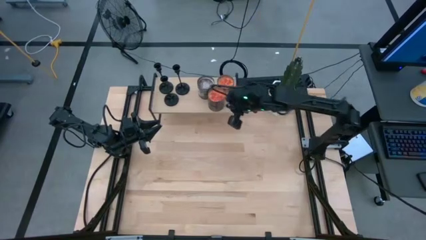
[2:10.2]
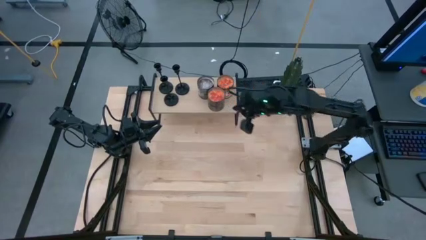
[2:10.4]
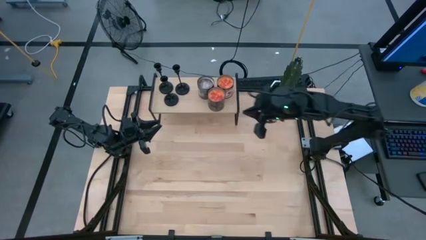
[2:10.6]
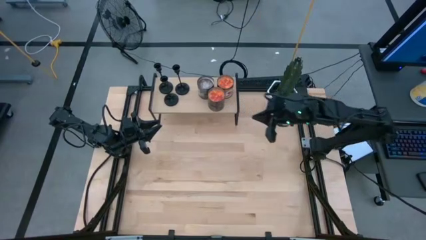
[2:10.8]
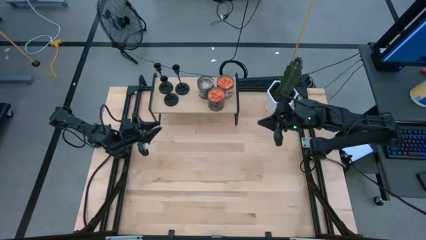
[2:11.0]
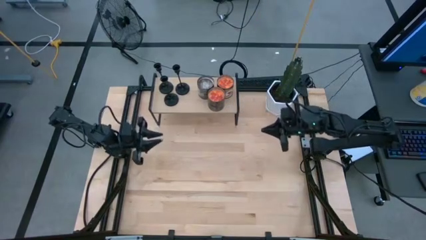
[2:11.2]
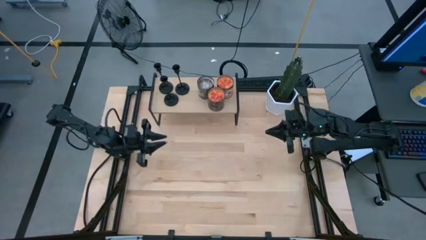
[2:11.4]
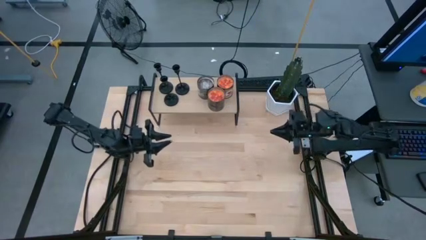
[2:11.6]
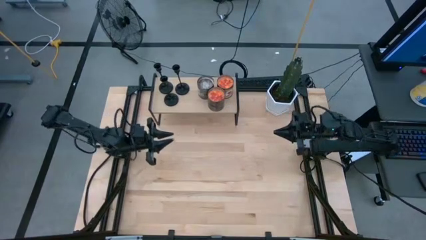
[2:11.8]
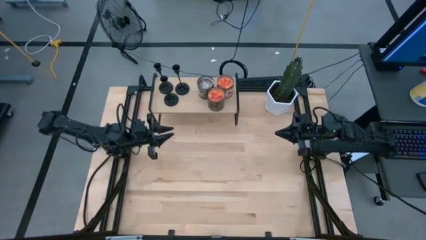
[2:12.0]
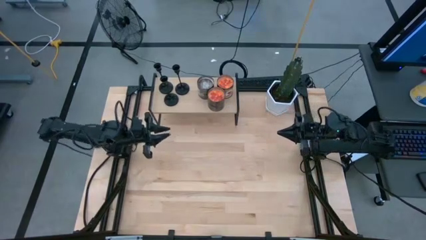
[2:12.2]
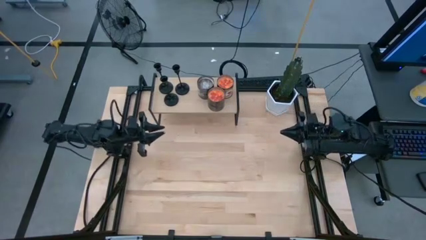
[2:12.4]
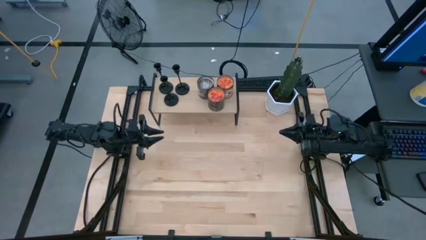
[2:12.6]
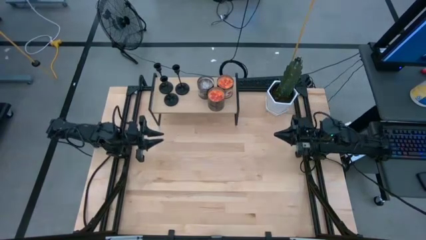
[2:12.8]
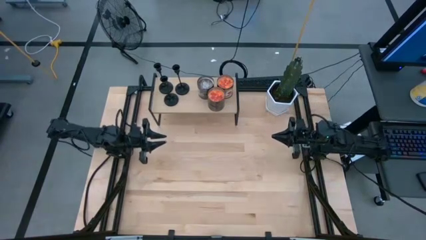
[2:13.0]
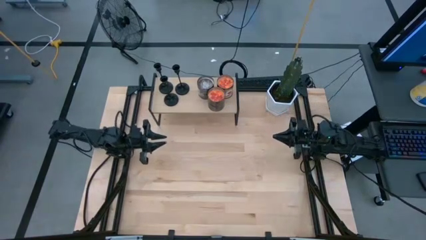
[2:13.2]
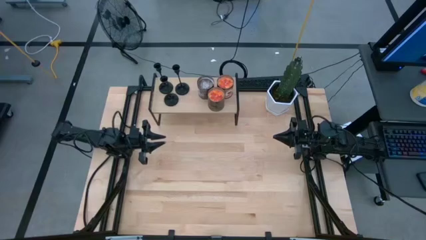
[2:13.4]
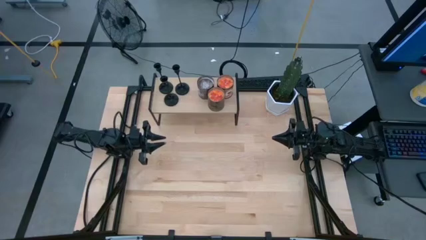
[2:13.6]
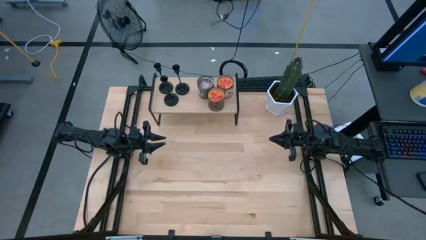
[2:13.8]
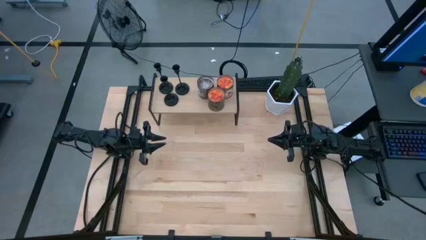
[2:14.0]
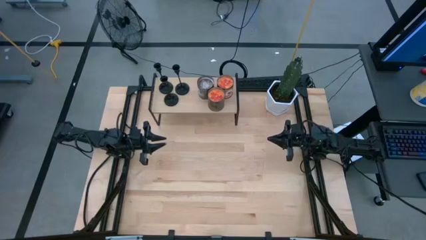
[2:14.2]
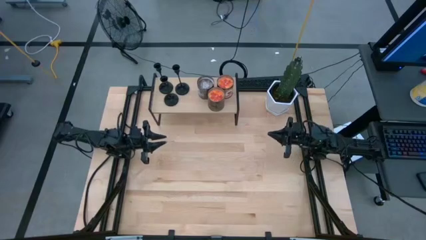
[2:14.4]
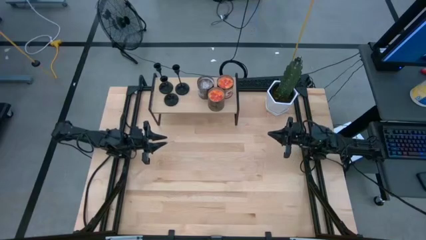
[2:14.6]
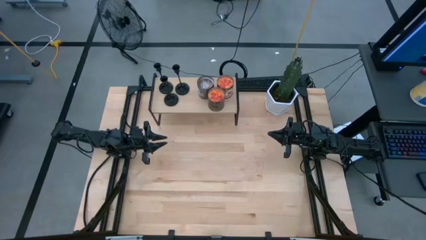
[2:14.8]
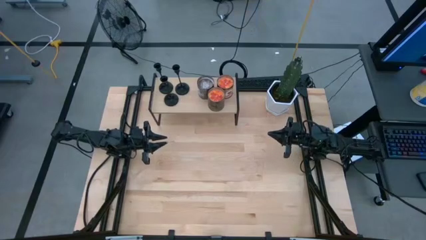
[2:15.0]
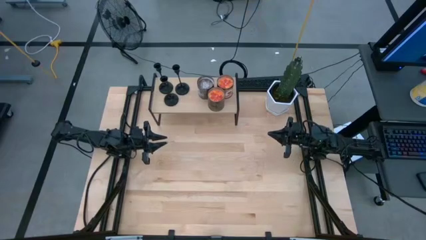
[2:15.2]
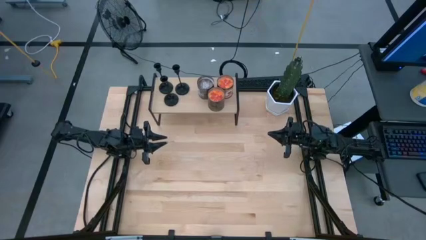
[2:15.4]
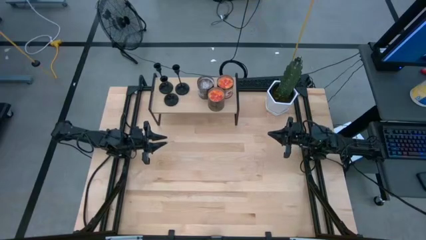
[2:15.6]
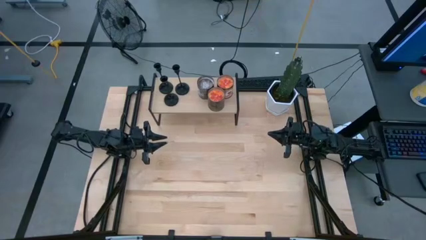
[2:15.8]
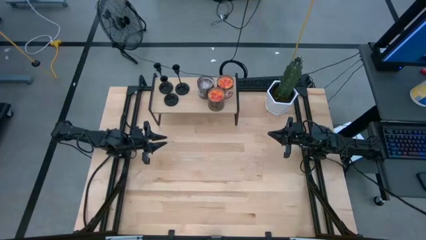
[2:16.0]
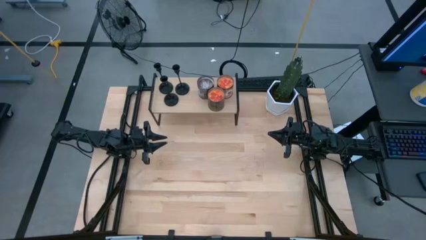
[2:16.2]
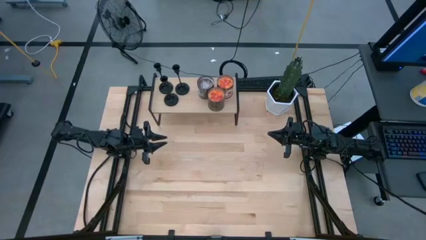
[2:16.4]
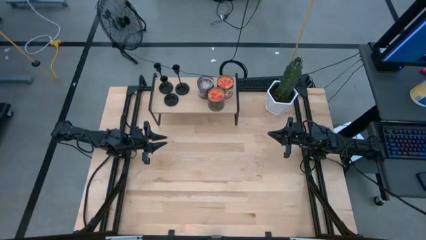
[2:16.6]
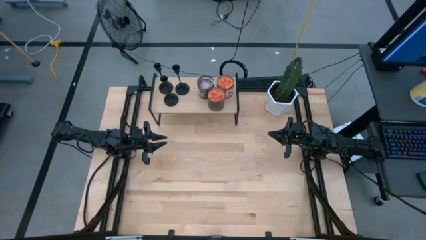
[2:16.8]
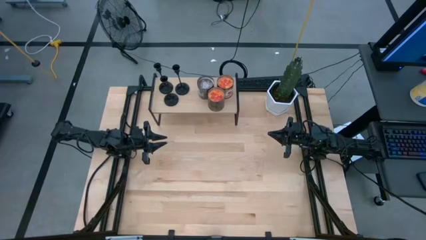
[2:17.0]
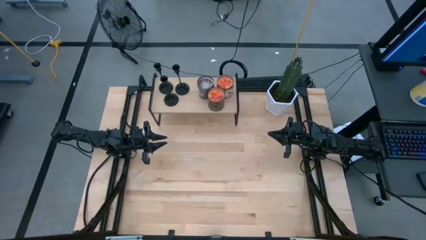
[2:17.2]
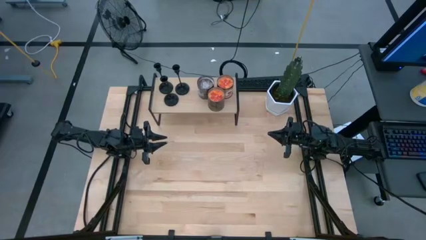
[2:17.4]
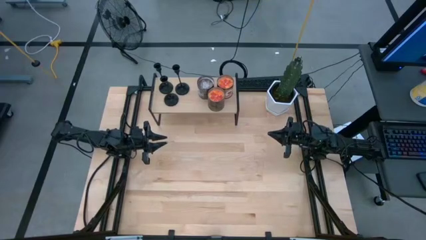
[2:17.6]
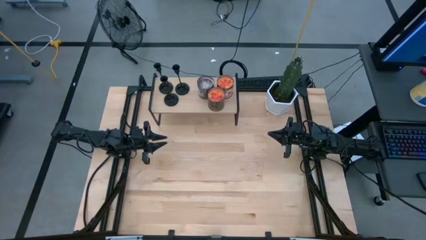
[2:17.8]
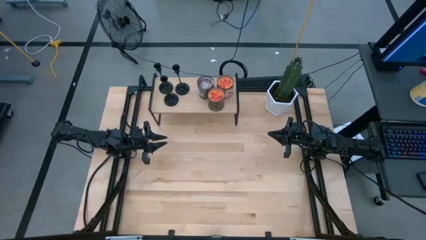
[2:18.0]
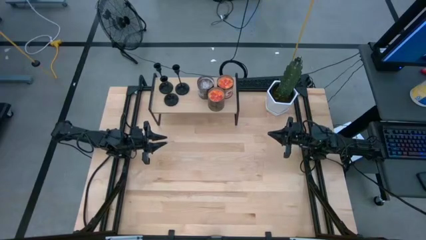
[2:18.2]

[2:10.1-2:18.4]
Task: Pick & Place candle stick holders
Return To Home Position

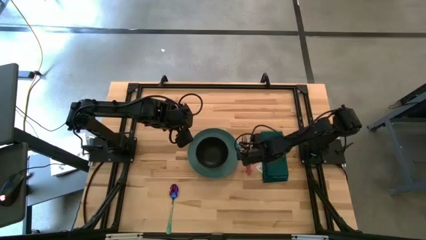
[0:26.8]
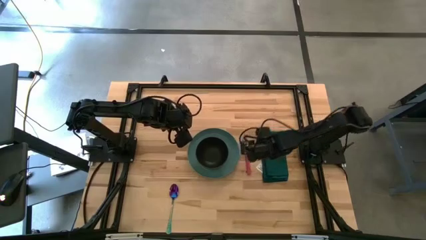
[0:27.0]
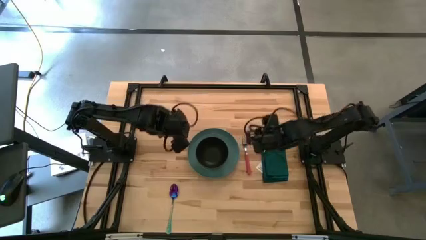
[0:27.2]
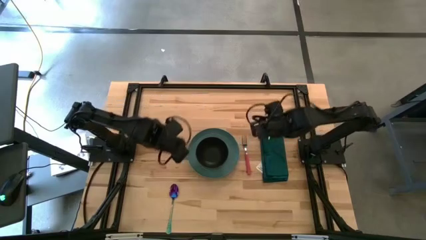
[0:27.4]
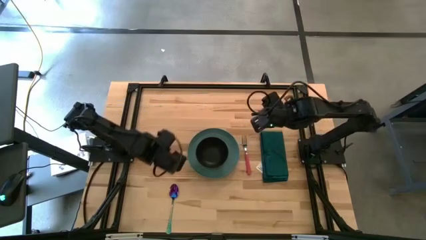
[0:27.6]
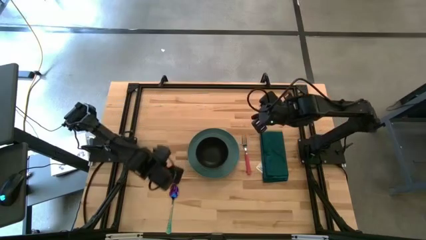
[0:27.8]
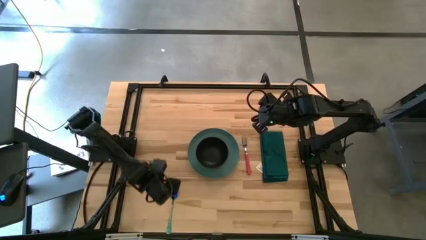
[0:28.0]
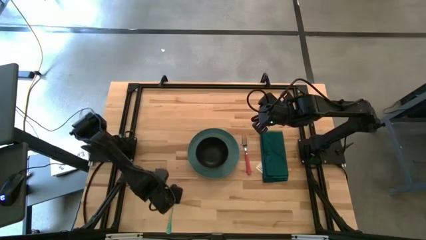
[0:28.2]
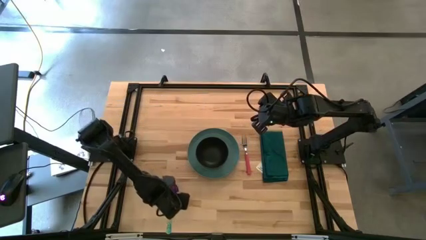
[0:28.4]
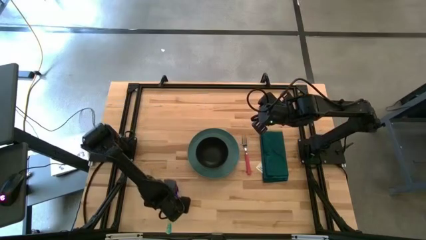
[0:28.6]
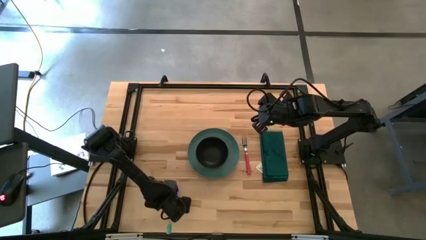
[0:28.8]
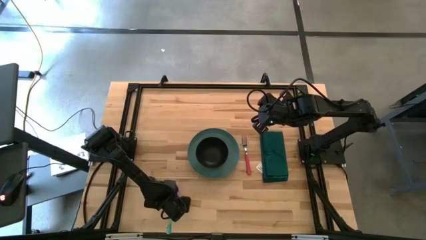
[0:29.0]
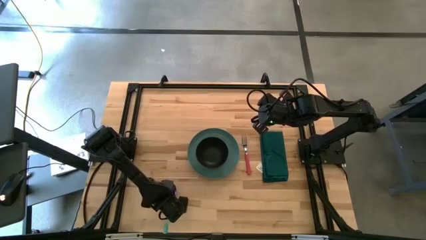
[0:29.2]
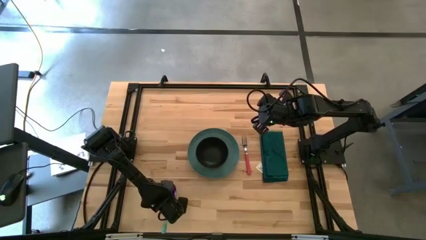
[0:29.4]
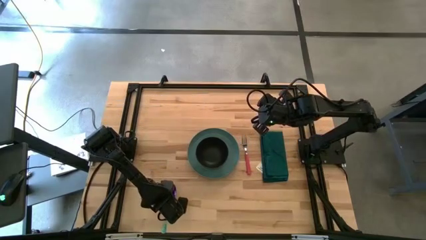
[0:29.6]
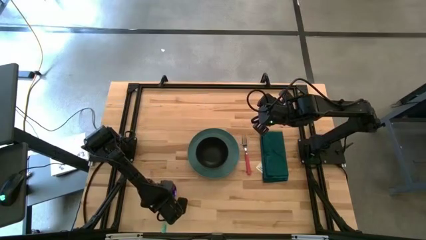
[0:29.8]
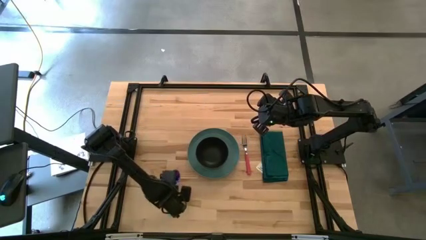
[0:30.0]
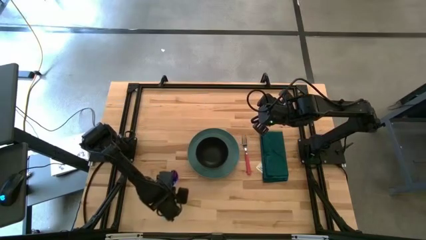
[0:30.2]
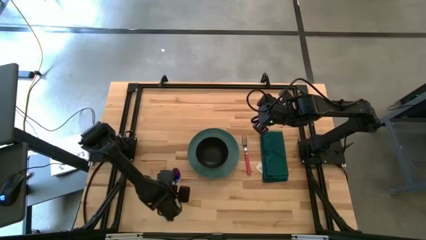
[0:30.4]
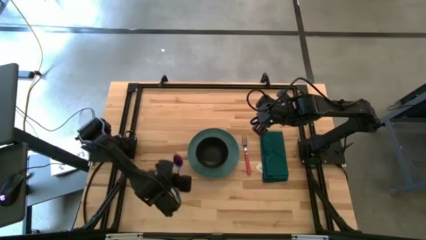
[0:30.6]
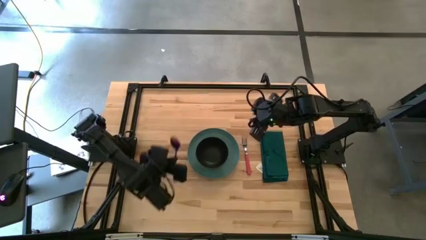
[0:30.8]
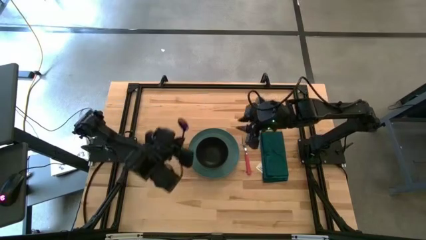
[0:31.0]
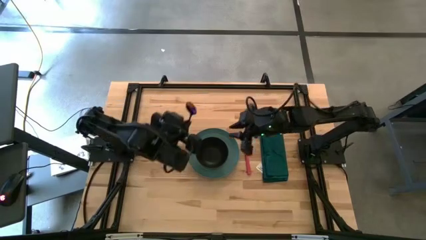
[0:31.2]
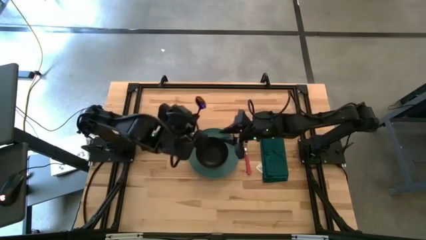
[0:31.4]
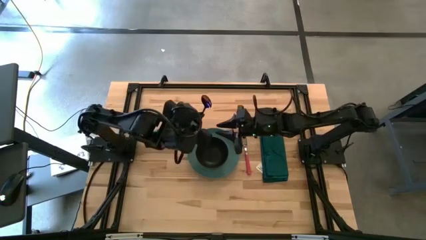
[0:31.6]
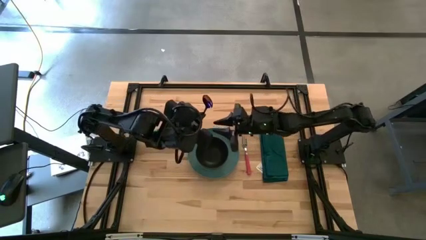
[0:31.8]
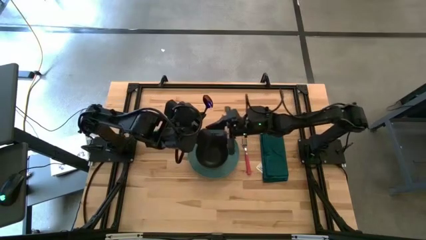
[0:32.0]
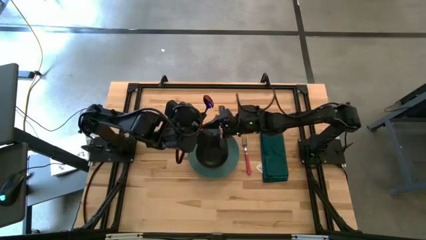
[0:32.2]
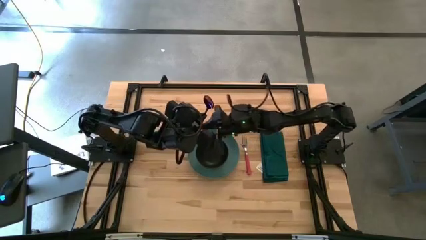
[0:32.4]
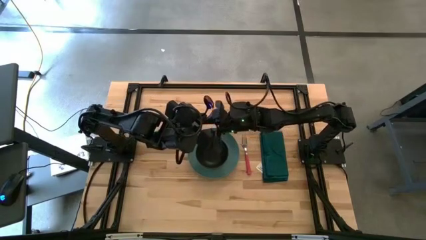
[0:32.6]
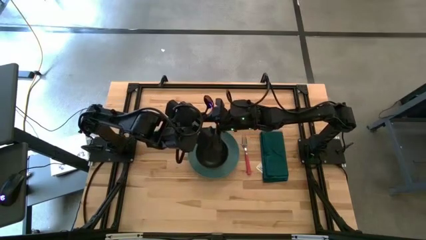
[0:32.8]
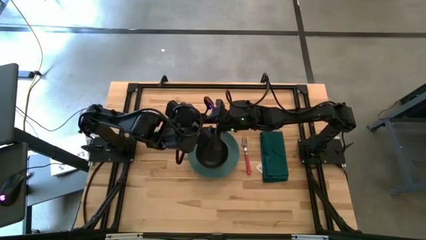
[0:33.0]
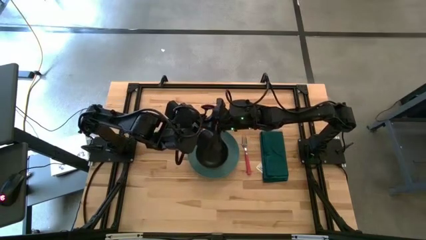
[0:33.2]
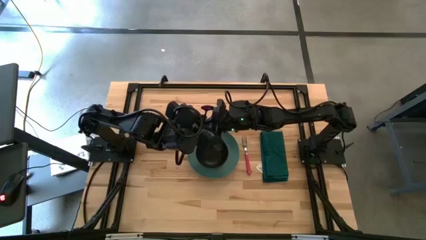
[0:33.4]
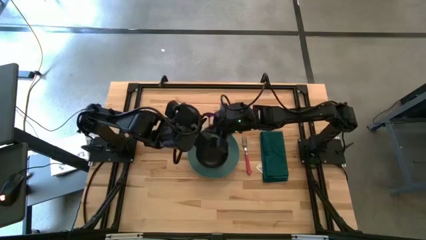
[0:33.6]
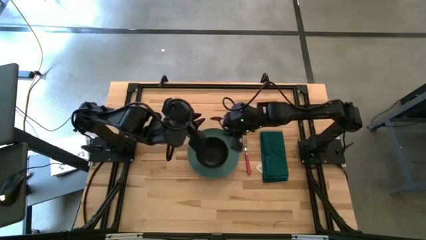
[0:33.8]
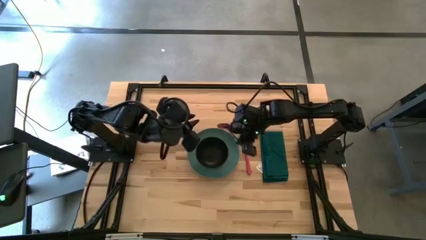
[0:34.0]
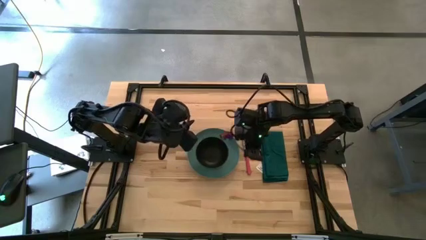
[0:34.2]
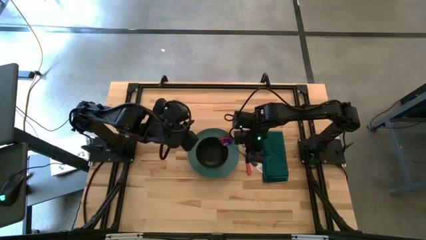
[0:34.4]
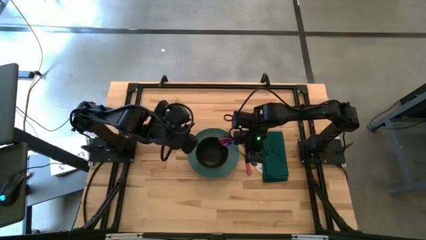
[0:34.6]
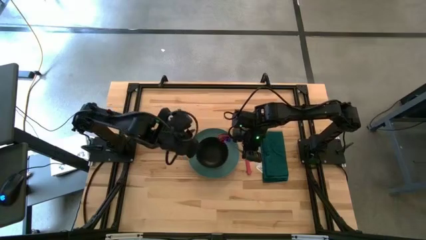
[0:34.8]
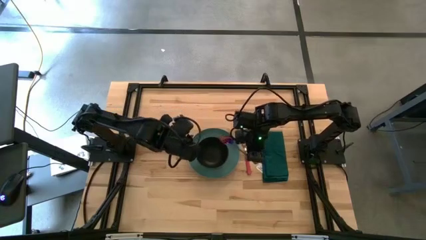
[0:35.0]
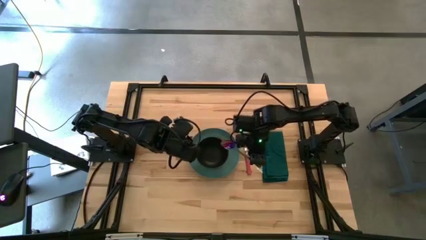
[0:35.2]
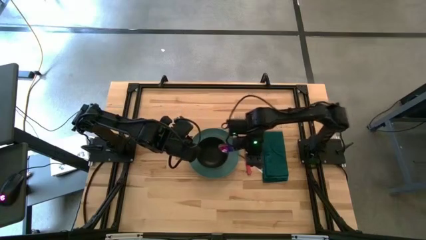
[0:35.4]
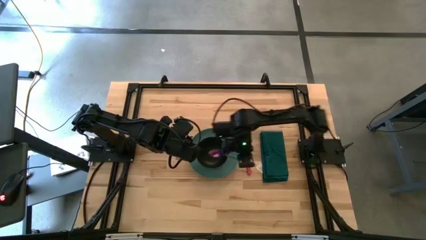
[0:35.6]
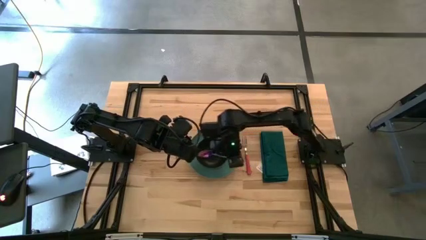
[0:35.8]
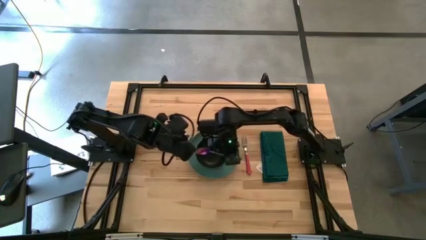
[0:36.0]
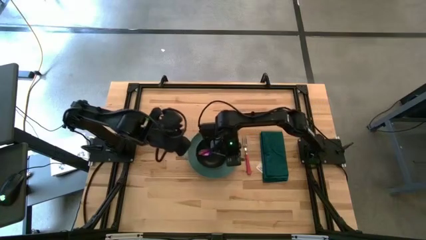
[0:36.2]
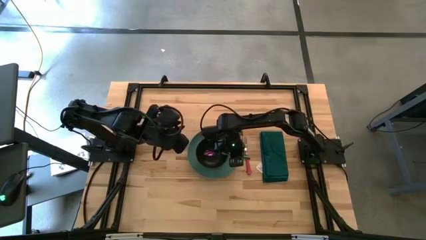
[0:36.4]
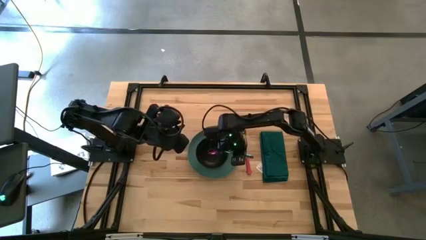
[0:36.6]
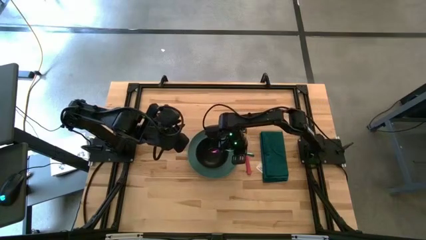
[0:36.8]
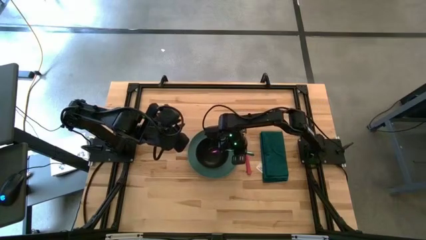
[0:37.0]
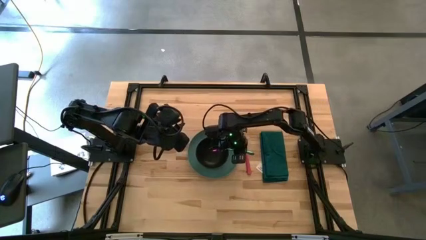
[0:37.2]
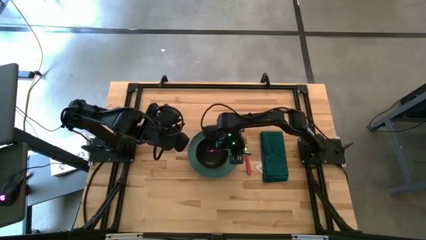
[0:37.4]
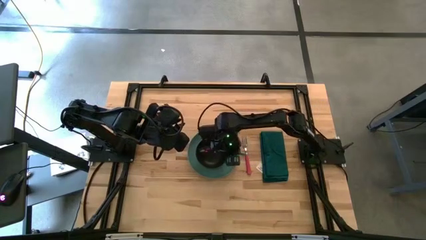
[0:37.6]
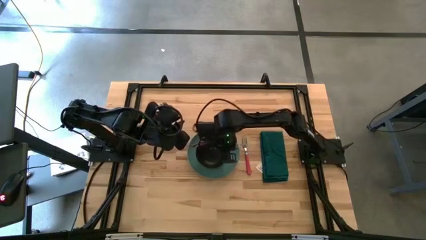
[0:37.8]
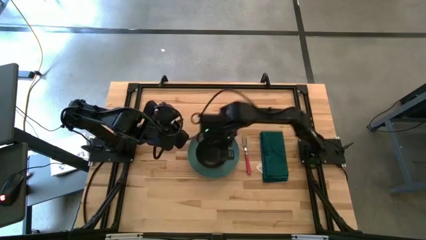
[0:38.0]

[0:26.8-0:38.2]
Task: Set table place
Put the blue spoon into the black bowl on the table
